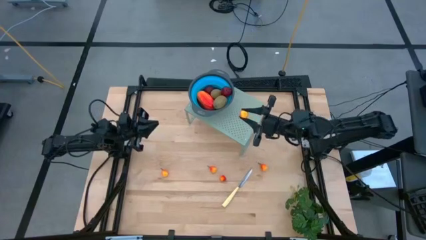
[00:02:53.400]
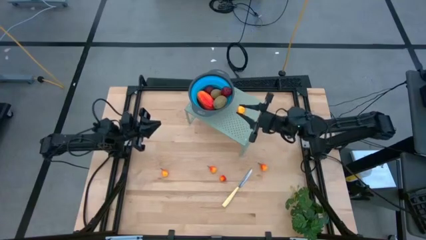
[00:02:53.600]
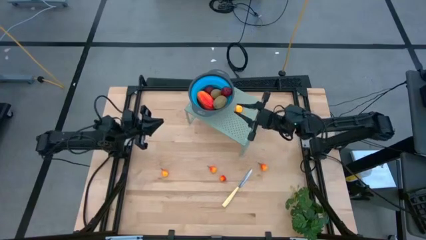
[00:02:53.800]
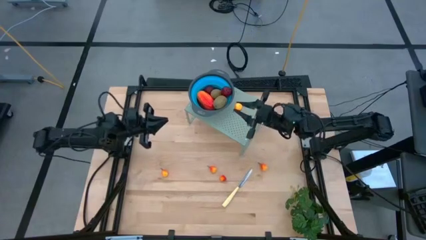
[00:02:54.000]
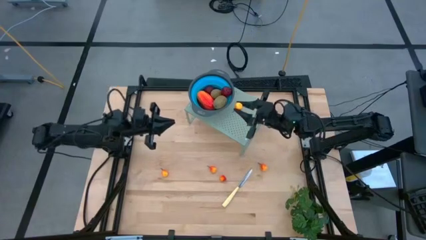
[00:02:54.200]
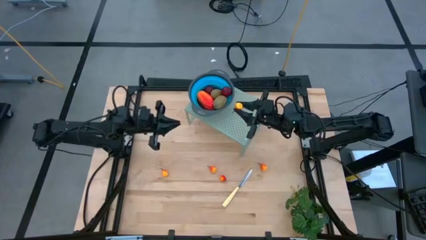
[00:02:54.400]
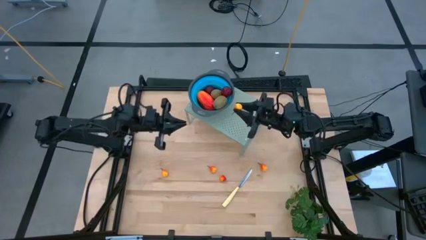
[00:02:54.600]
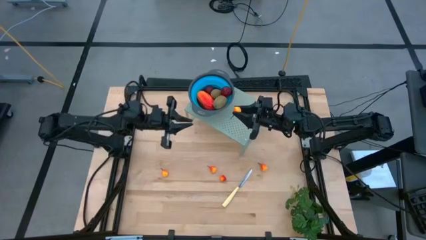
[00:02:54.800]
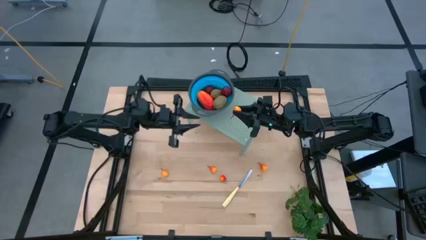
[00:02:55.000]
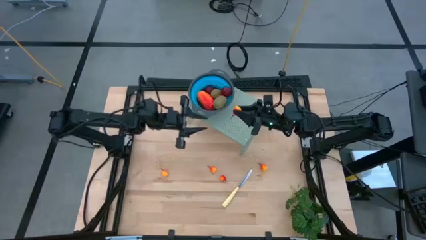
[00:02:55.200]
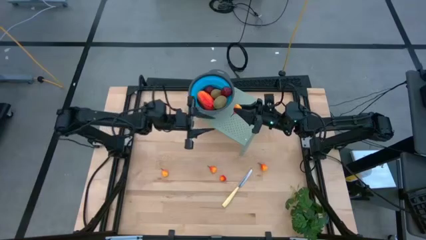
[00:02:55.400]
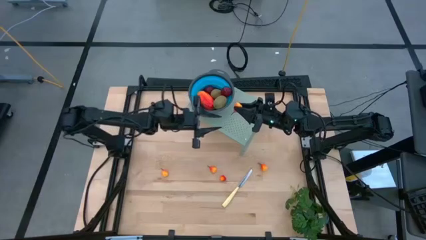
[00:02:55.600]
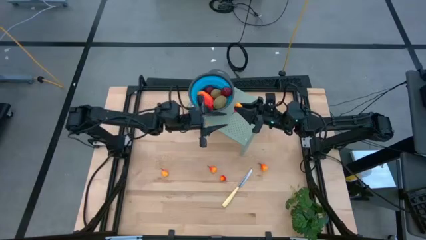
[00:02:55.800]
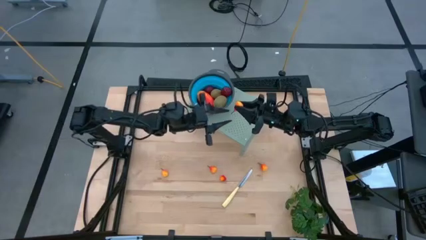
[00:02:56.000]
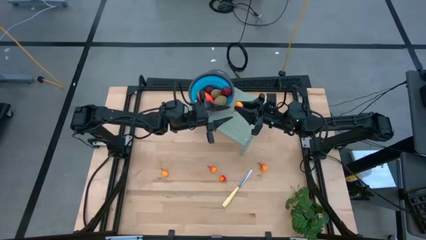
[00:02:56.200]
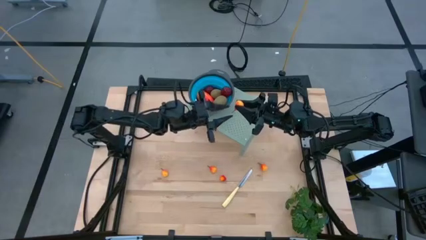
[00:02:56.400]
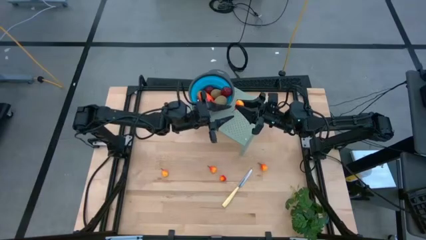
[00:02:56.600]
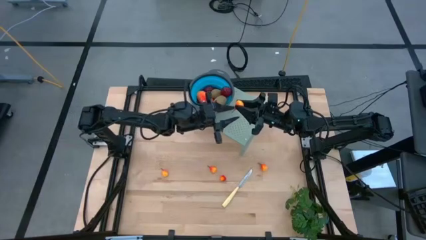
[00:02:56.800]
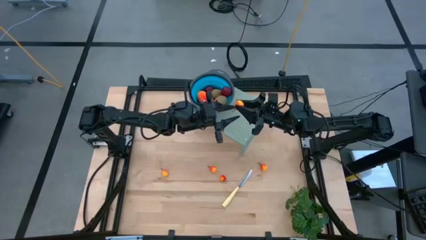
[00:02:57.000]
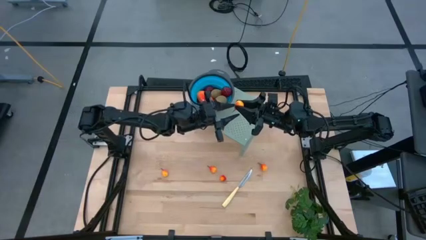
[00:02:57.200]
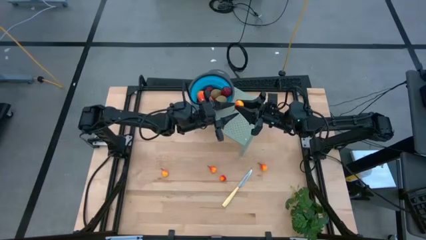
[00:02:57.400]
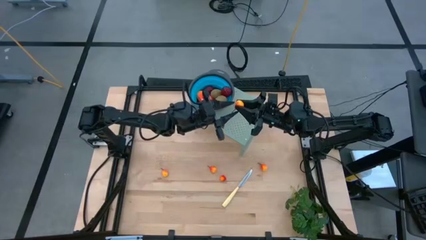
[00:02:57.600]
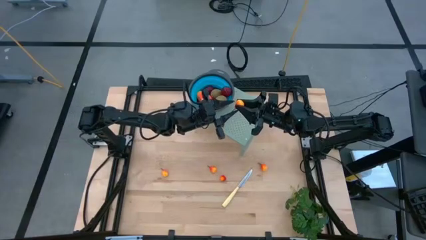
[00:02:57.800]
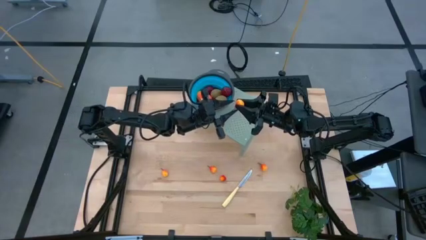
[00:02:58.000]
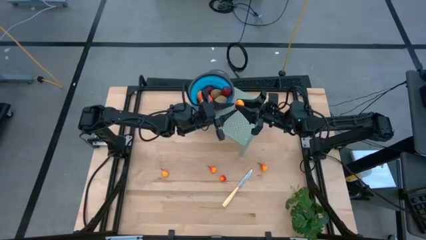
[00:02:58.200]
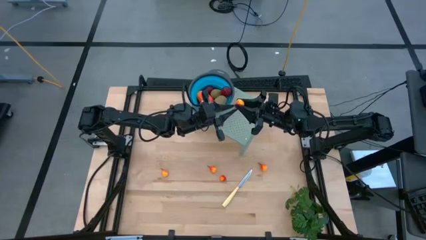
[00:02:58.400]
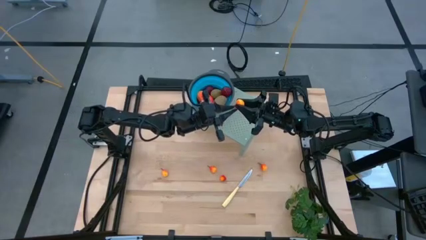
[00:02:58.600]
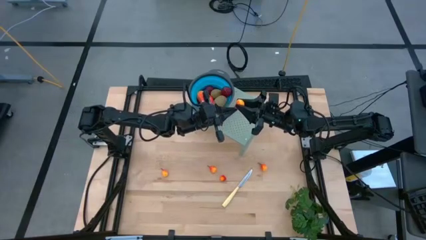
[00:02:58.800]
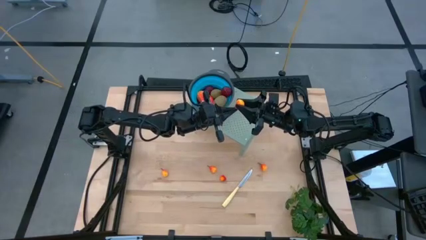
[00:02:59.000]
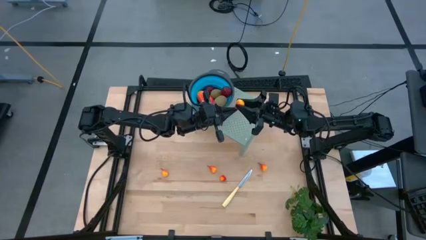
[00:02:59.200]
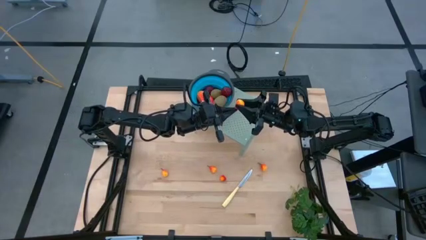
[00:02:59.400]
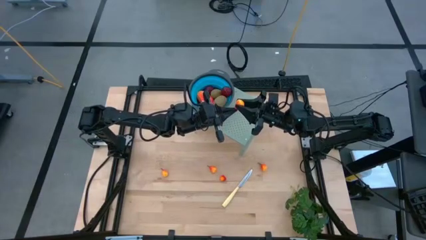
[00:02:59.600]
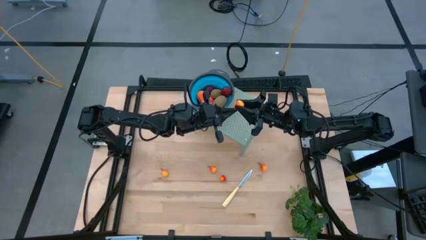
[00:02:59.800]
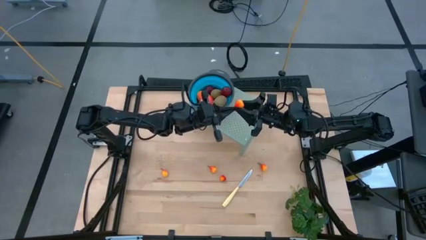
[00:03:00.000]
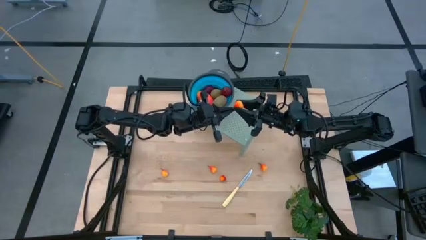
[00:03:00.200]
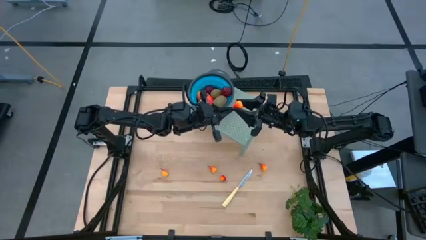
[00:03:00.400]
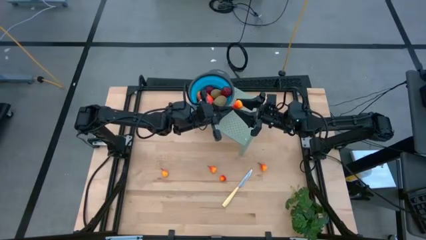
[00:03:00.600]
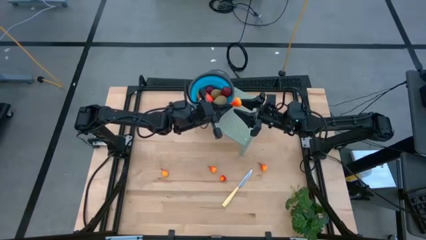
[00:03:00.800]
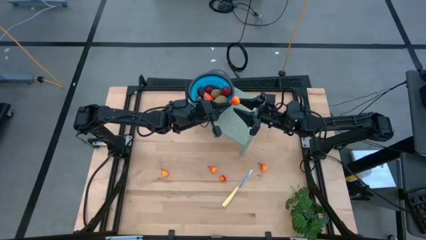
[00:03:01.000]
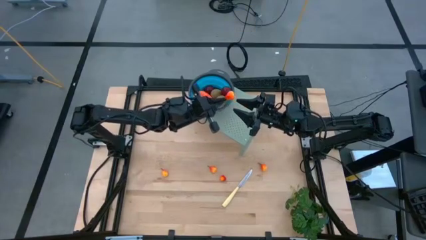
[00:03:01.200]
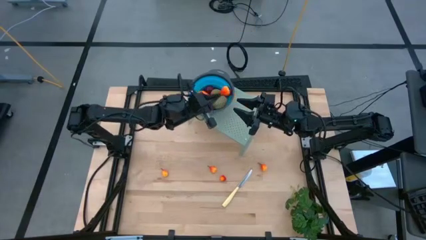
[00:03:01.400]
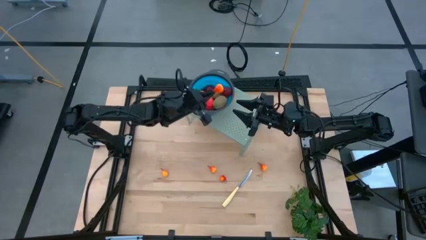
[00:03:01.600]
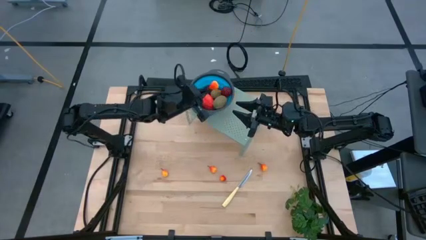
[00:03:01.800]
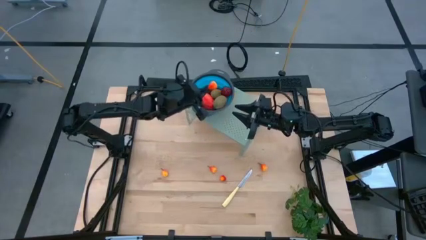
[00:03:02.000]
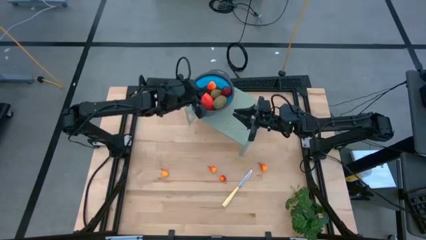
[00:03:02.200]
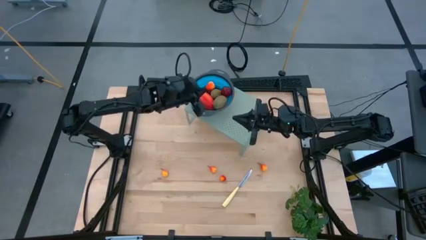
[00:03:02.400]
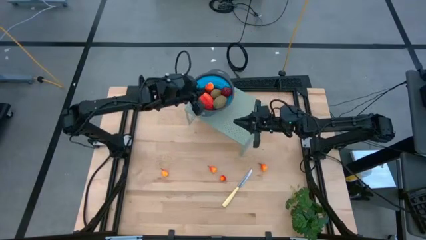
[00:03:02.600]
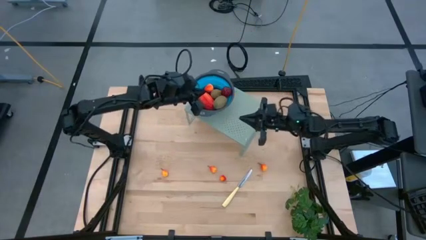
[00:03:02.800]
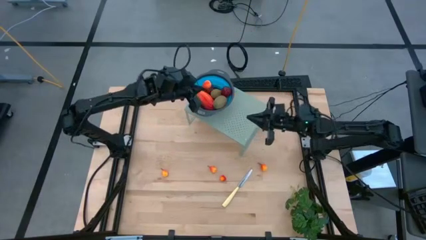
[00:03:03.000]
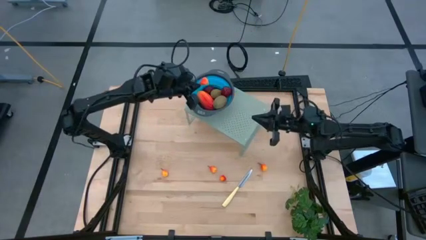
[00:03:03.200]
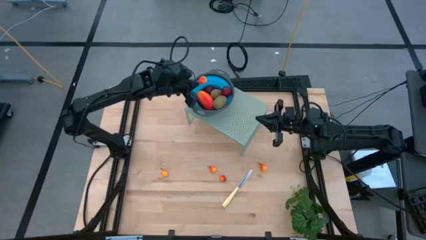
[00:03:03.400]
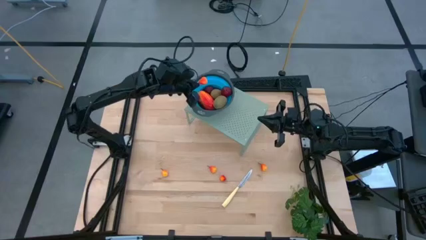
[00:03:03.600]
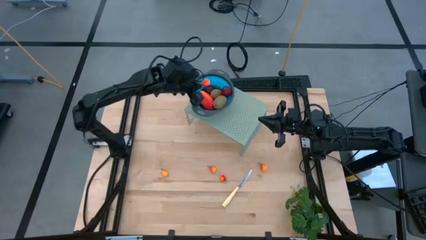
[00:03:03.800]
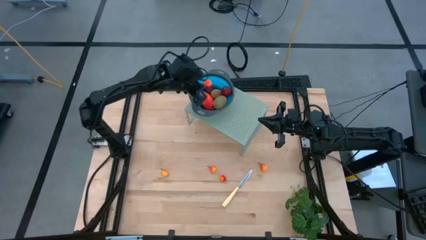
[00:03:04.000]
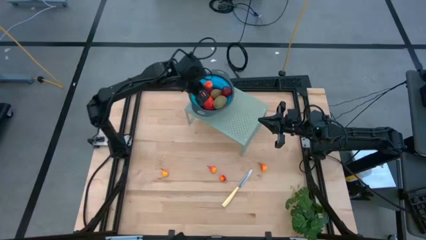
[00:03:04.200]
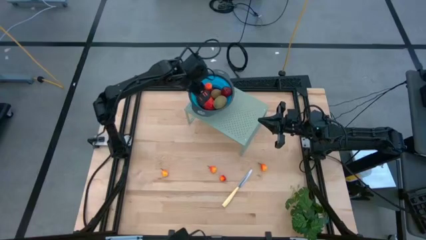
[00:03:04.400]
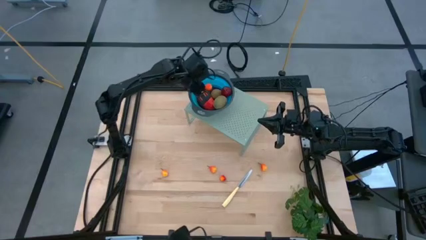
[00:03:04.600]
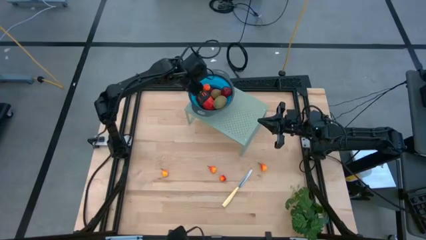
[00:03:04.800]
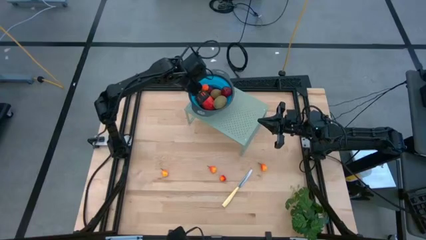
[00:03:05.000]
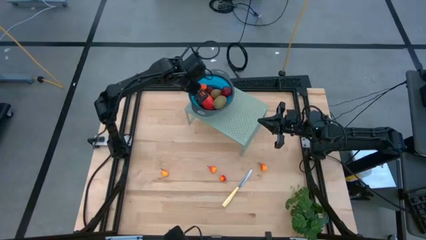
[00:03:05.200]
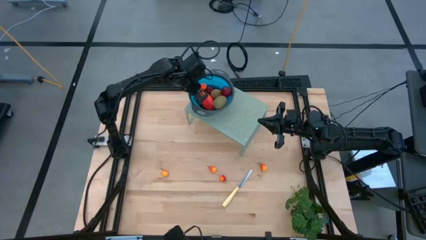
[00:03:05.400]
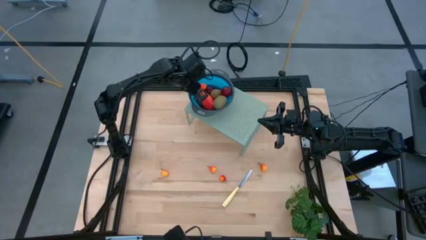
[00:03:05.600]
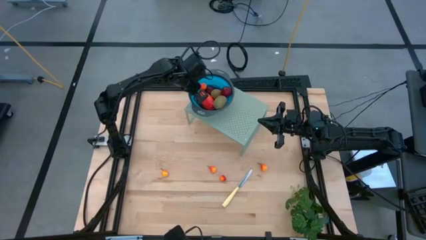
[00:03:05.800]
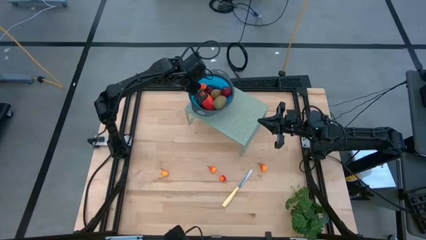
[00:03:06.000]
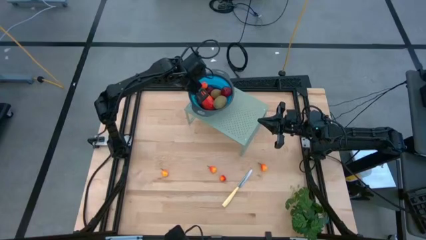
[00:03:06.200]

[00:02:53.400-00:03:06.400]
Task: Pick & Place Fruit
Put the peach into the blue strainer bowl on the shelf
